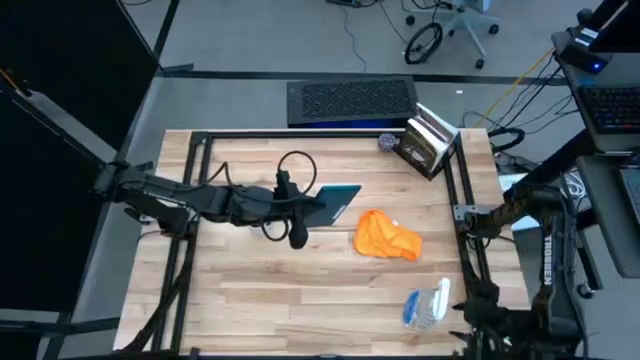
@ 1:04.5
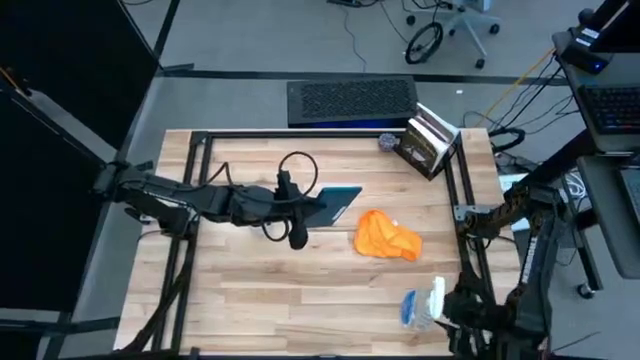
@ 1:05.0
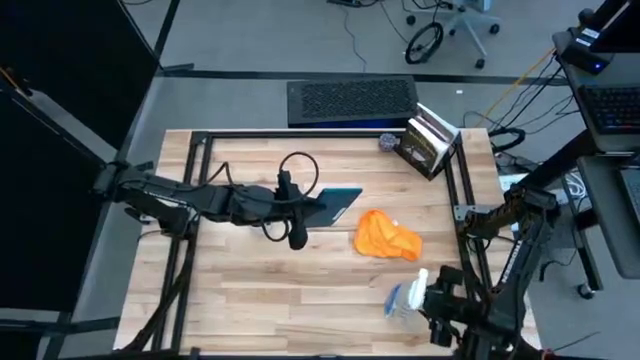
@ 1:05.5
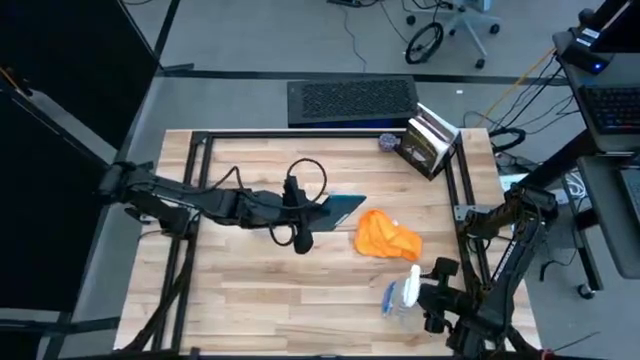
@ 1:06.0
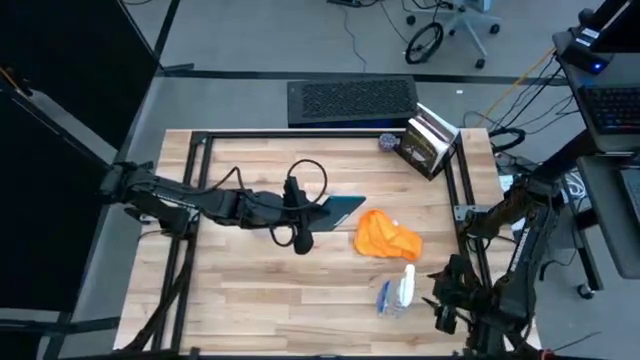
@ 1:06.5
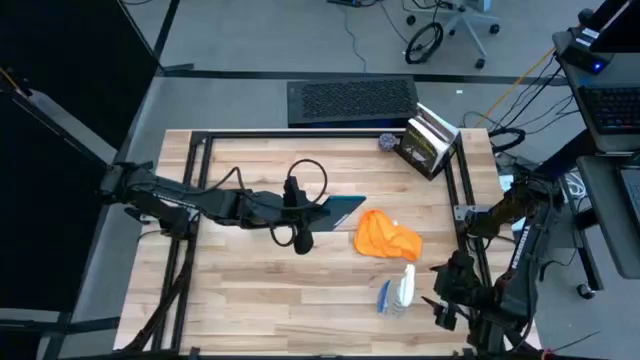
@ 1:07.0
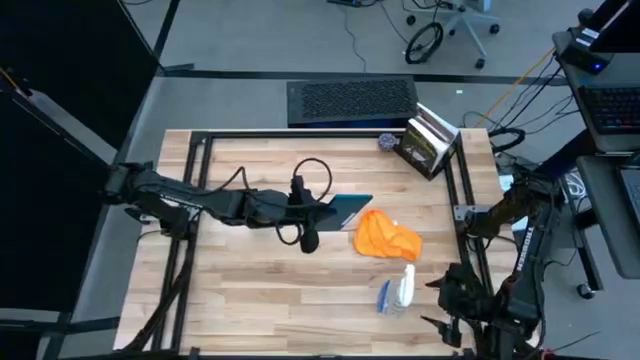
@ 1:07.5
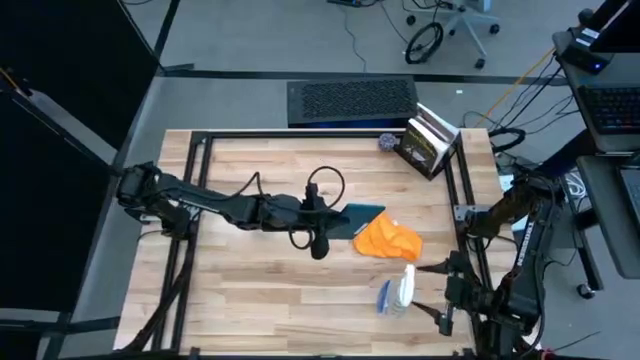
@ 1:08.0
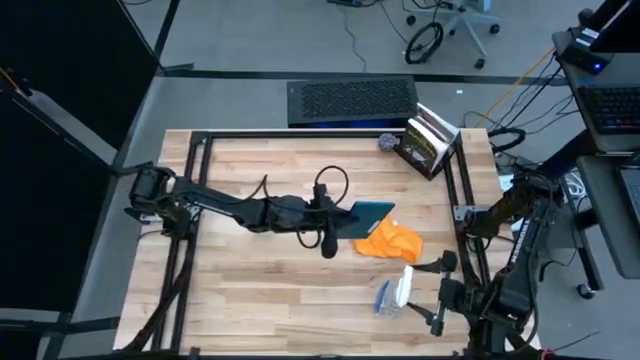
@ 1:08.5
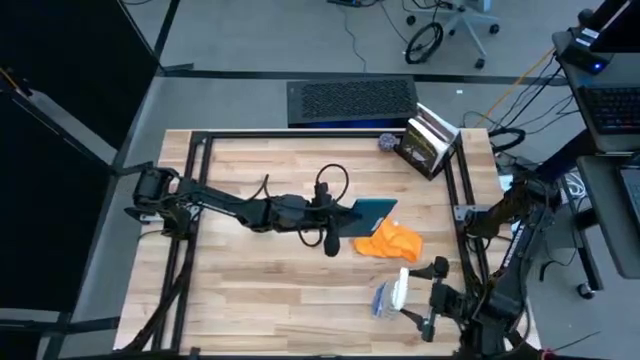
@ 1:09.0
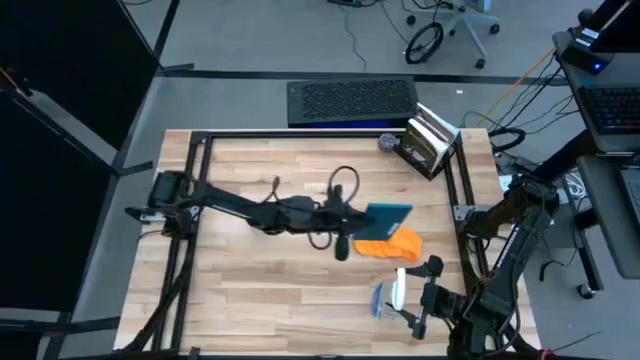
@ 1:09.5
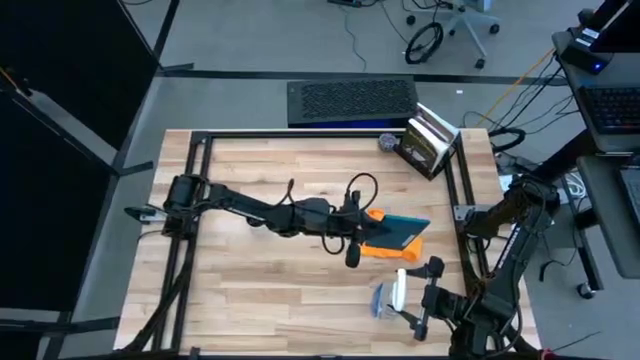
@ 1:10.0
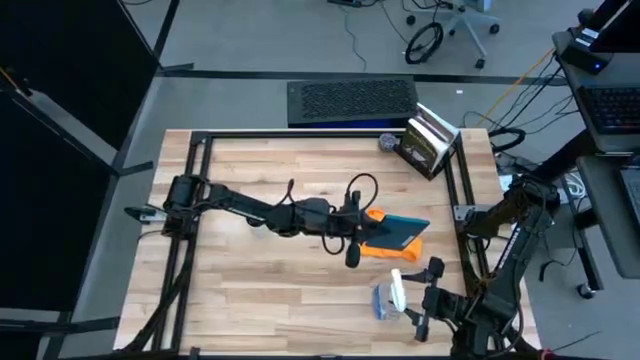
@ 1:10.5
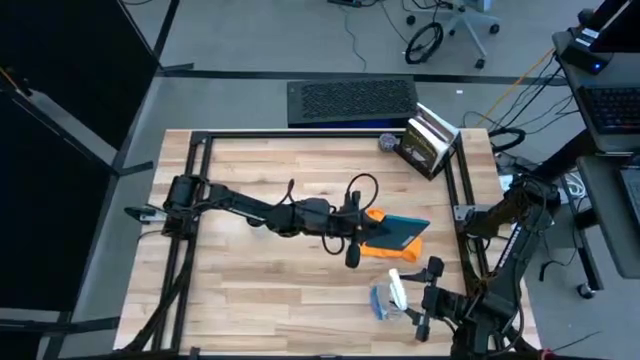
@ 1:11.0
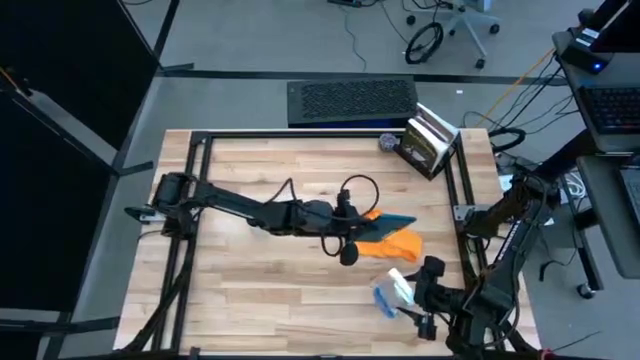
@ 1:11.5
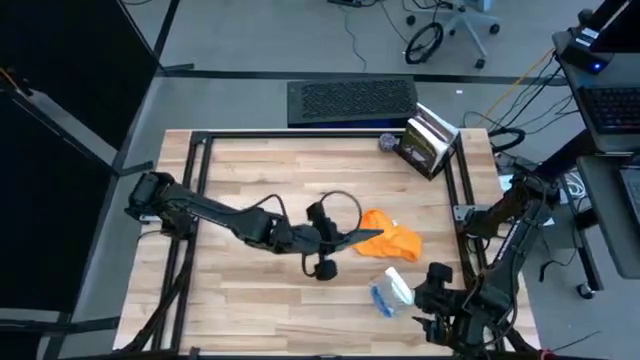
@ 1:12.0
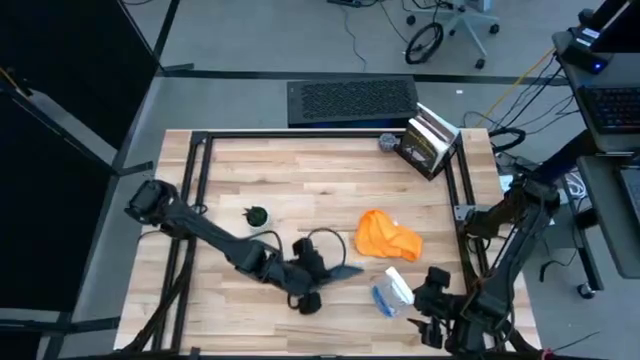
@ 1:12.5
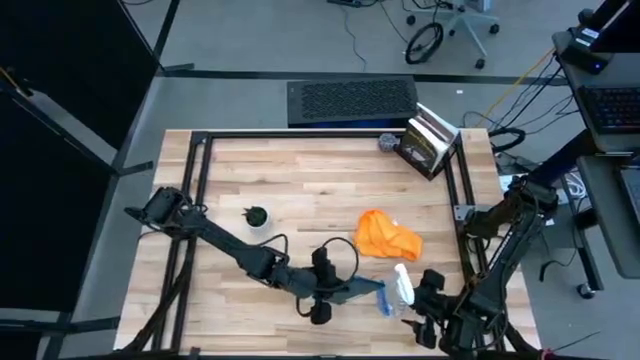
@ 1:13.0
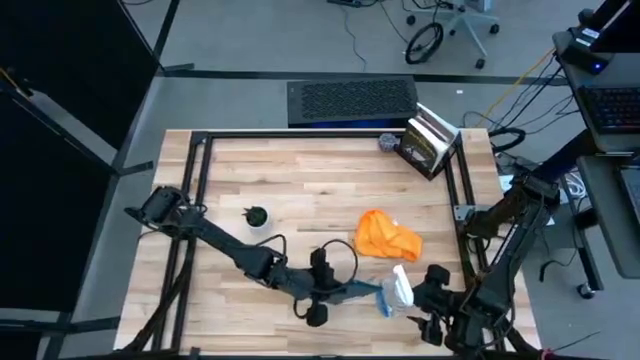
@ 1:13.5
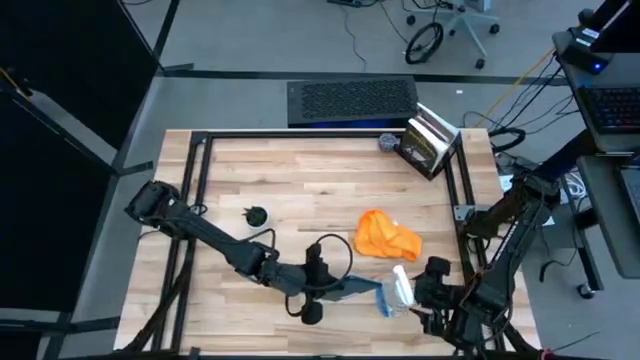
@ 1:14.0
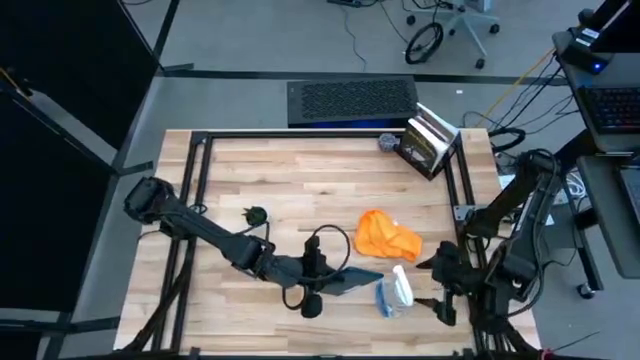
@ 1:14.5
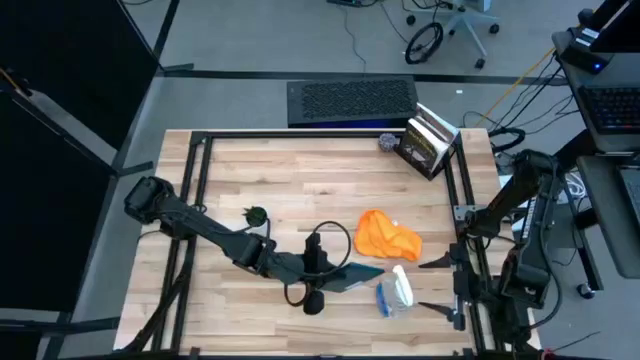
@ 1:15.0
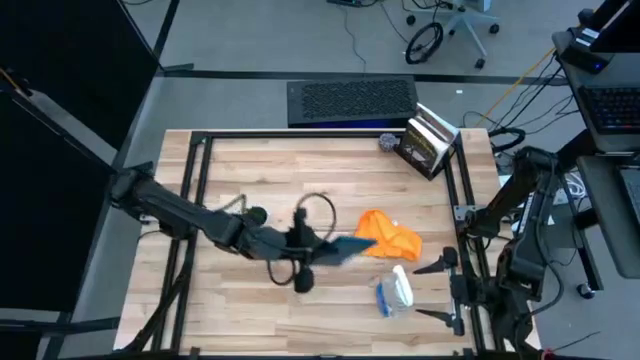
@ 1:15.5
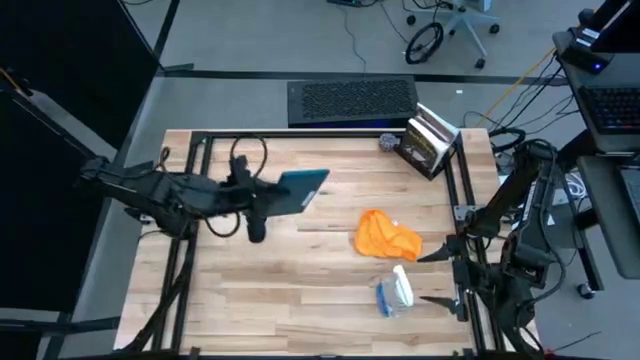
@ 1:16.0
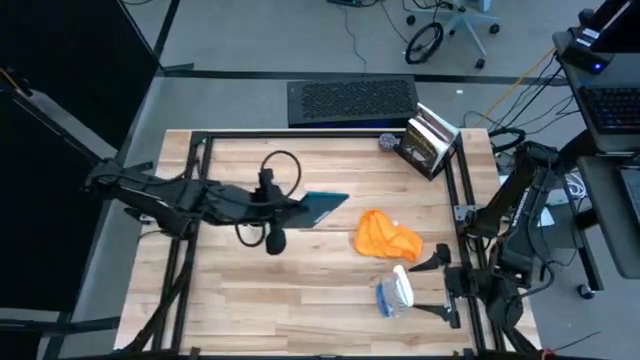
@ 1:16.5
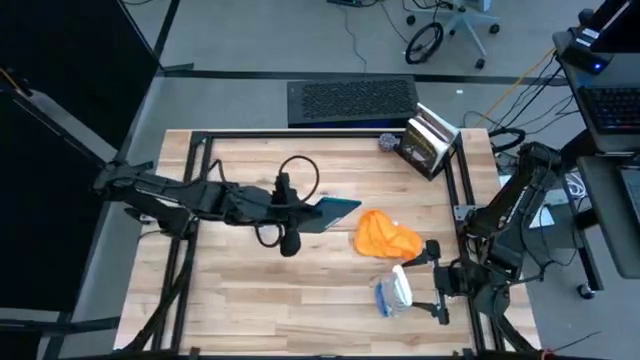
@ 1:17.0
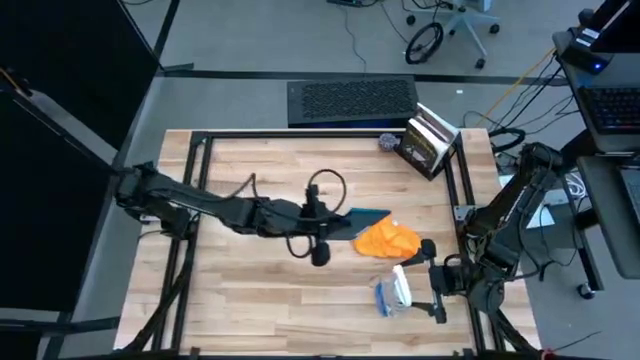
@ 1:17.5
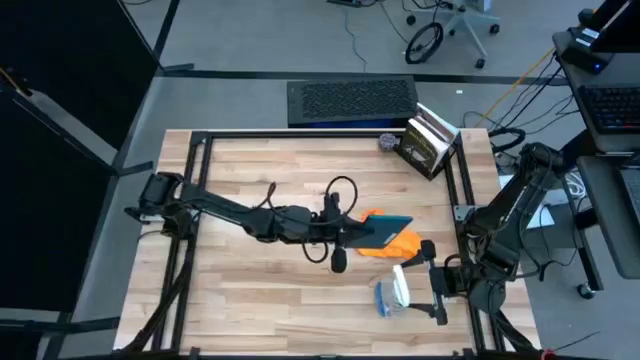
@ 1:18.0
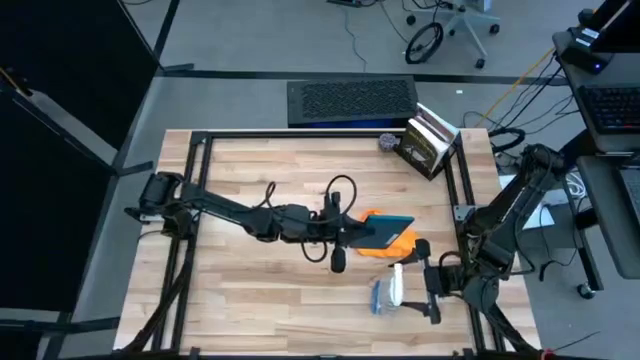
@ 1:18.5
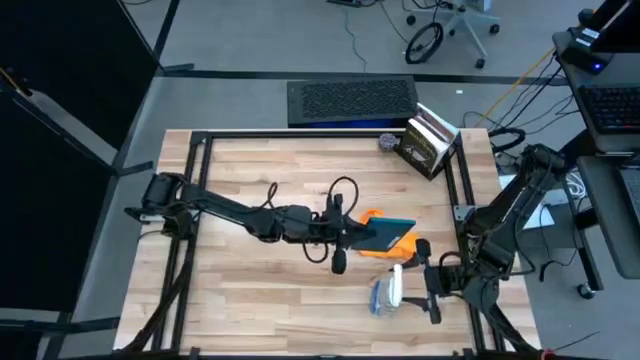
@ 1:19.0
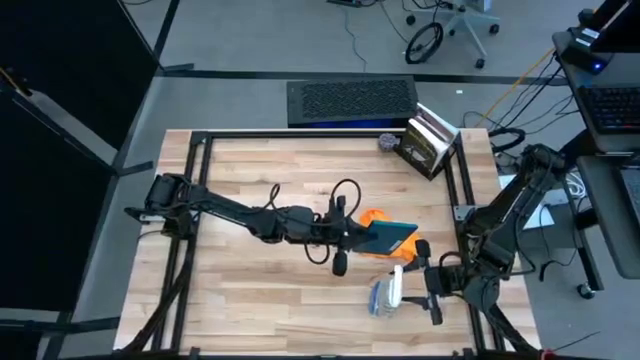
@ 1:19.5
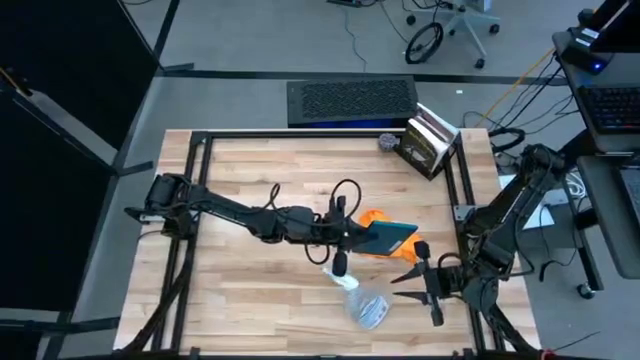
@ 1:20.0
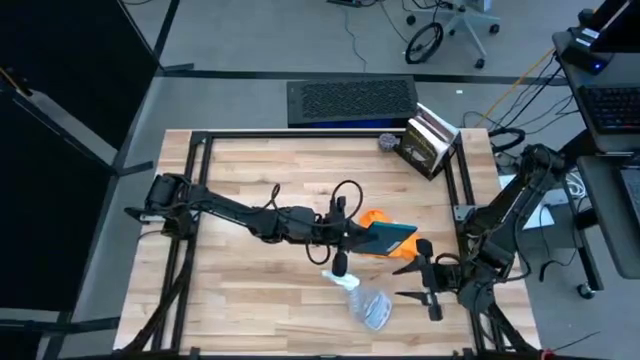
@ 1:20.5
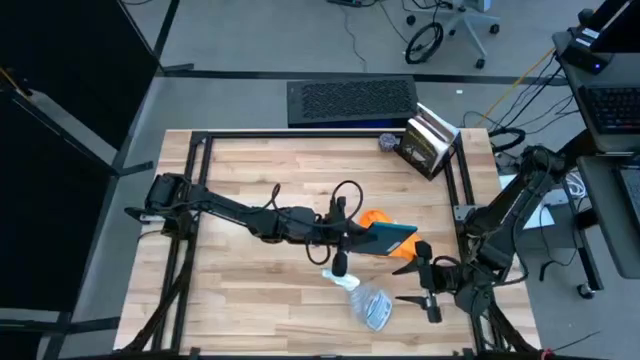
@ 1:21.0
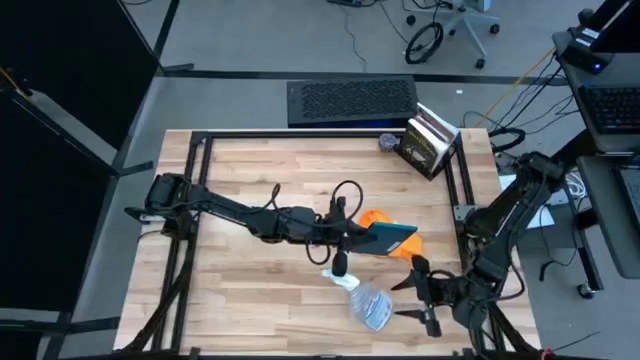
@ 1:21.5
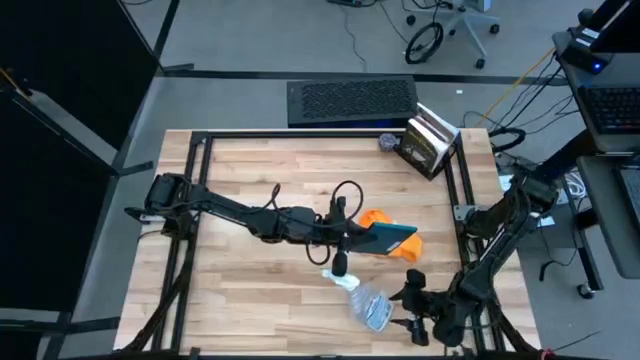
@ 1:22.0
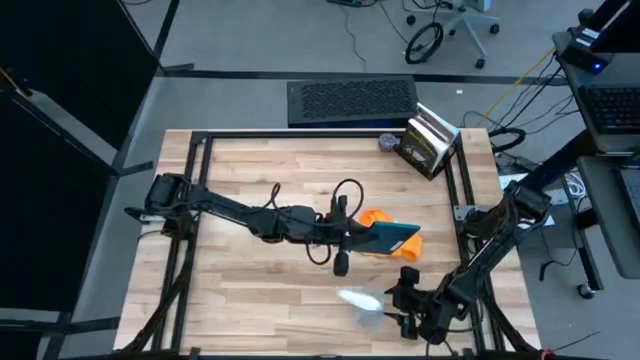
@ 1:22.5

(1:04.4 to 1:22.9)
Task: Apply microfiber cloth
Spray the blue tablet with the transparent spray bottle

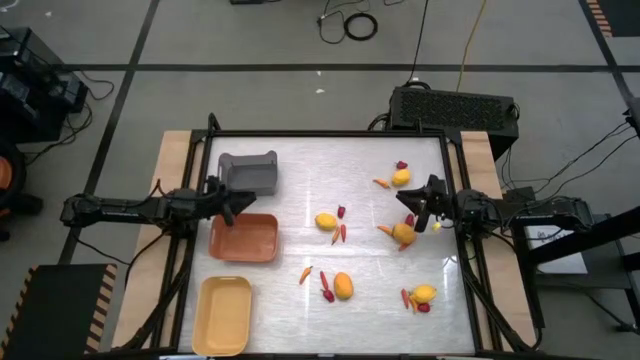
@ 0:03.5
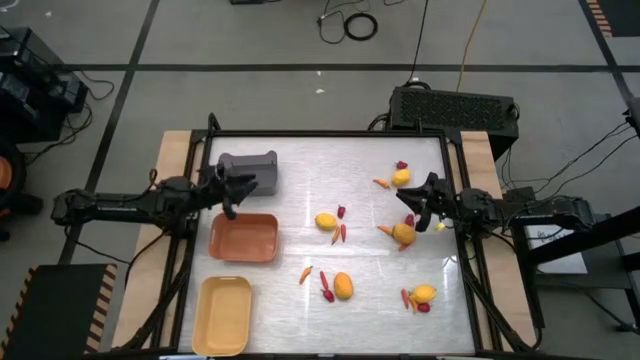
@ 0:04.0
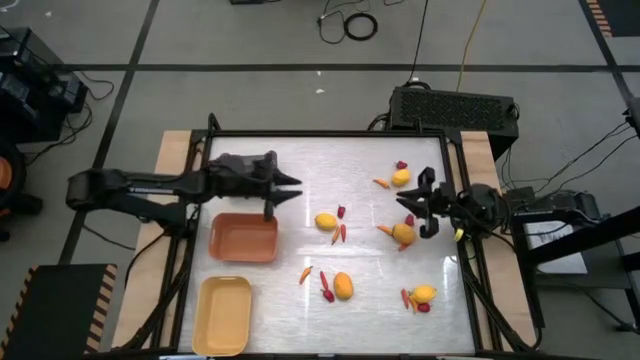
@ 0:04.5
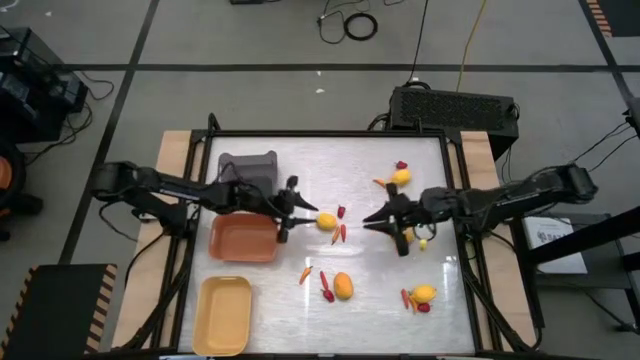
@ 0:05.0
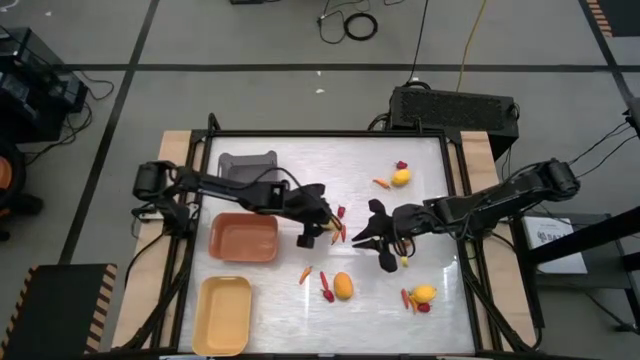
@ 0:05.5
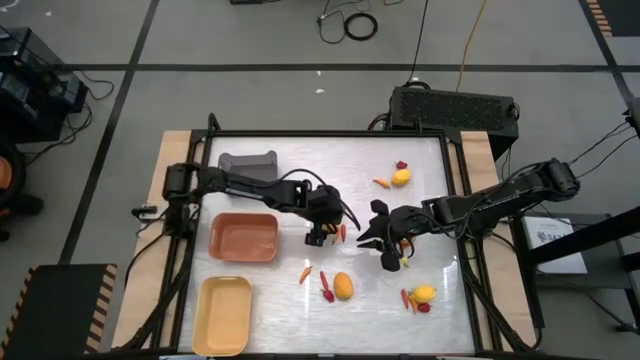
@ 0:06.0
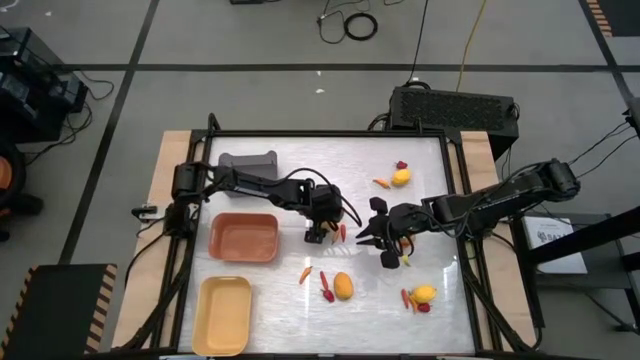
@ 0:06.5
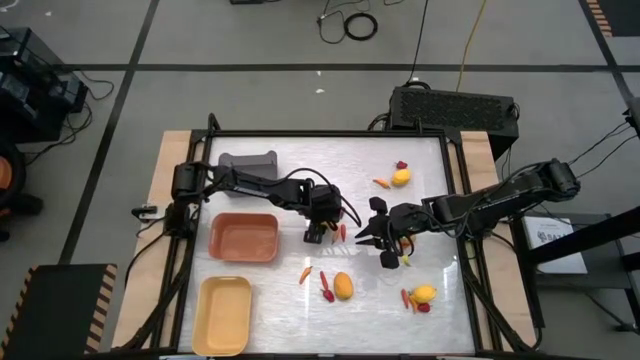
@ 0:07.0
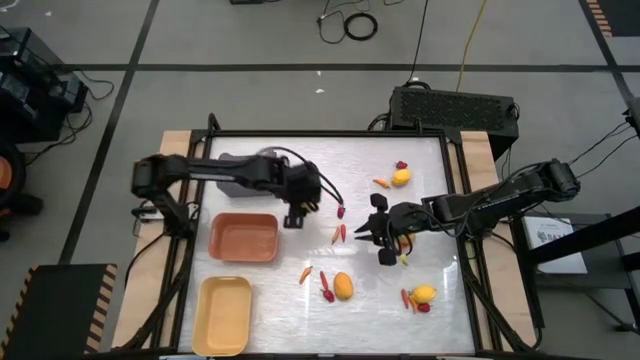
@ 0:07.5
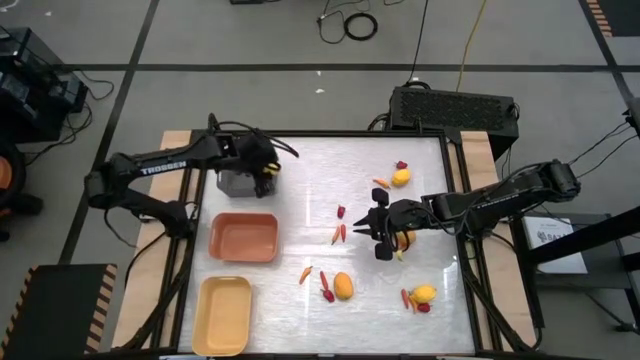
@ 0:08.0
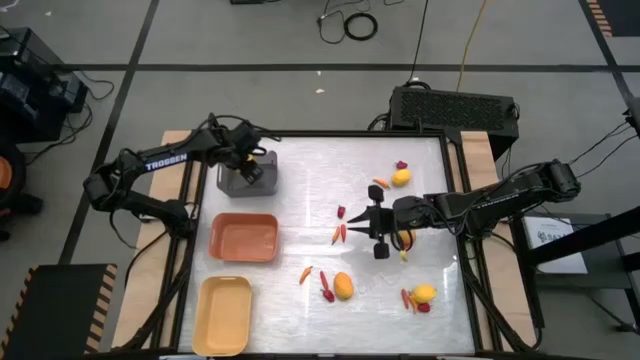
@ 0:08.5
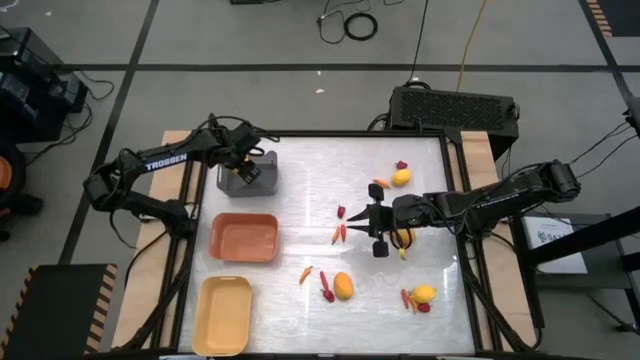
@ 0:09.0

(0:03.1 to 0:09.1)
Task: Sort produce into baskets
Put the lemon into the black bin
